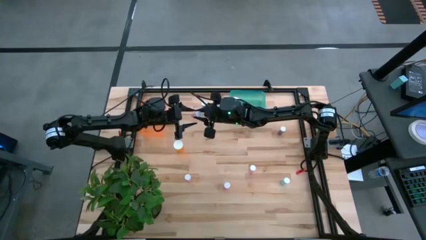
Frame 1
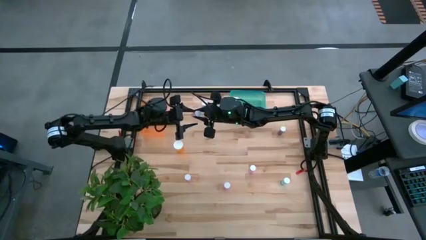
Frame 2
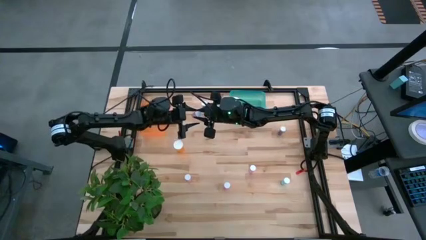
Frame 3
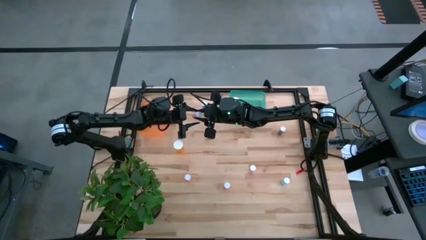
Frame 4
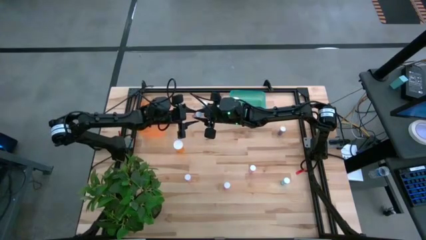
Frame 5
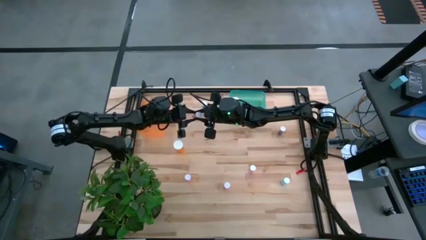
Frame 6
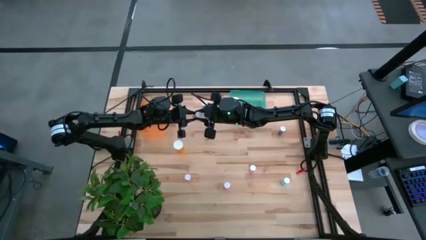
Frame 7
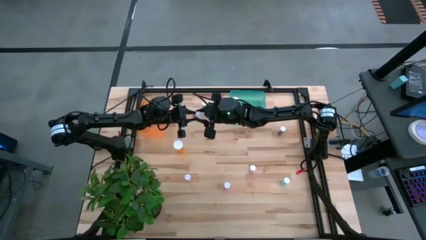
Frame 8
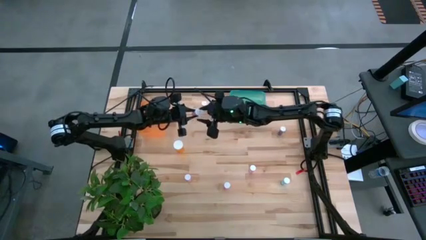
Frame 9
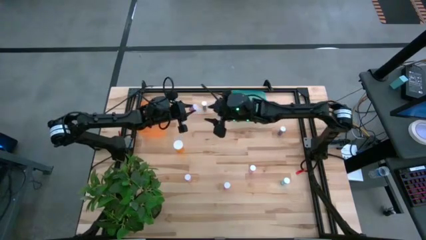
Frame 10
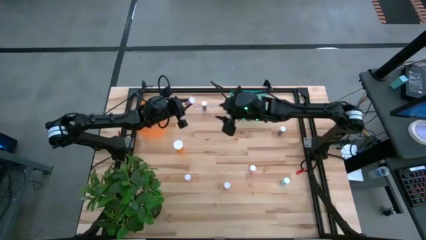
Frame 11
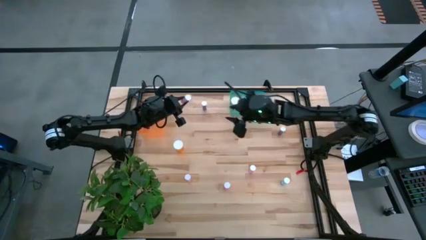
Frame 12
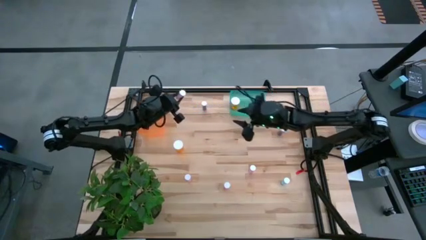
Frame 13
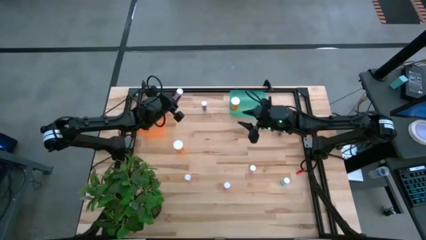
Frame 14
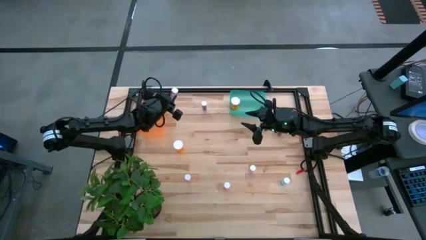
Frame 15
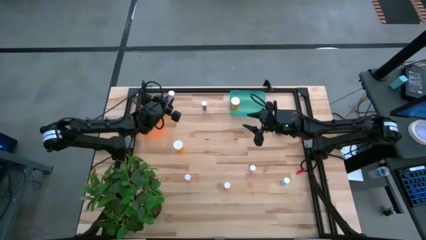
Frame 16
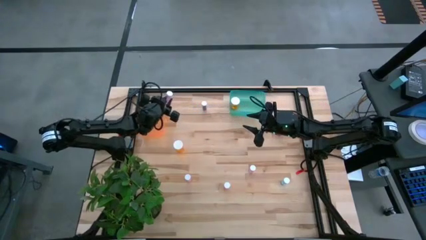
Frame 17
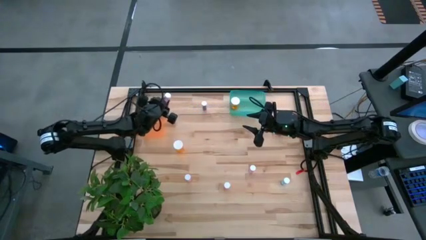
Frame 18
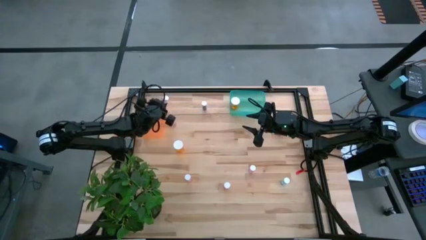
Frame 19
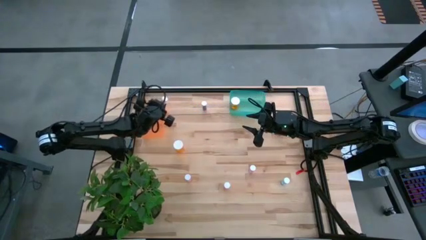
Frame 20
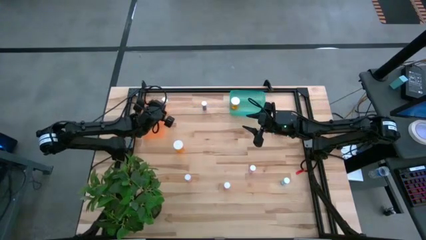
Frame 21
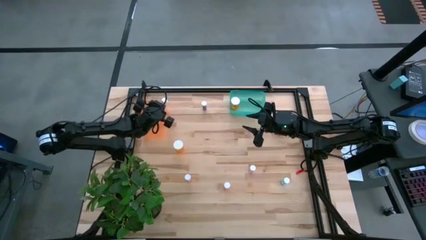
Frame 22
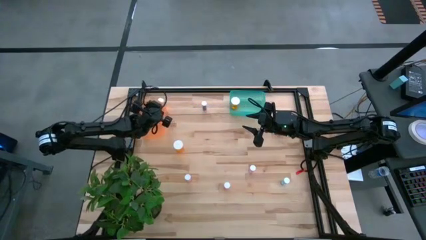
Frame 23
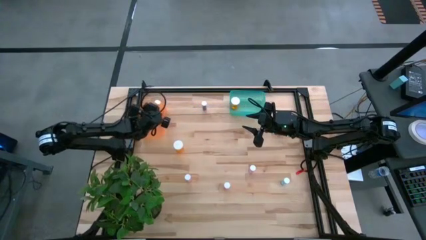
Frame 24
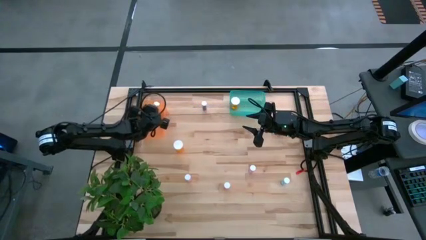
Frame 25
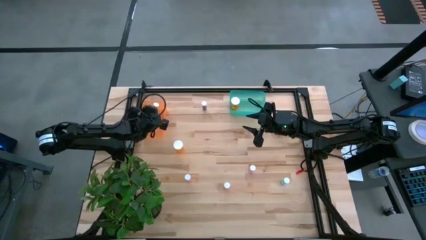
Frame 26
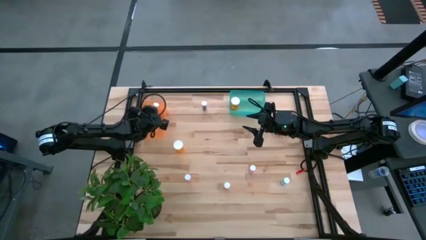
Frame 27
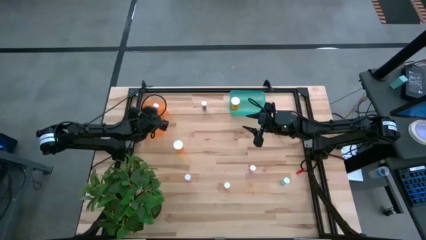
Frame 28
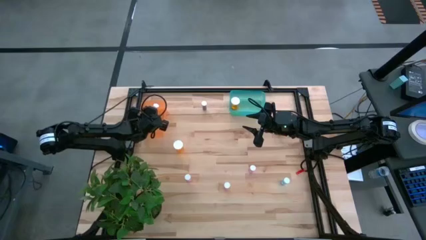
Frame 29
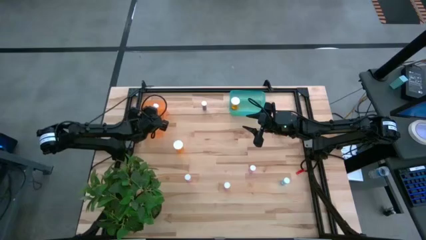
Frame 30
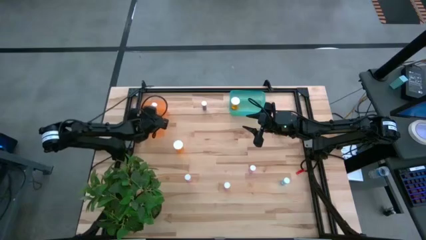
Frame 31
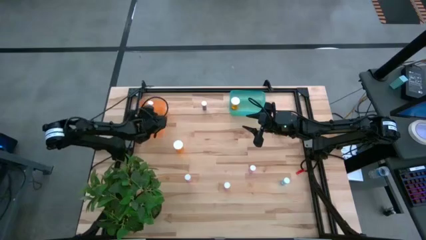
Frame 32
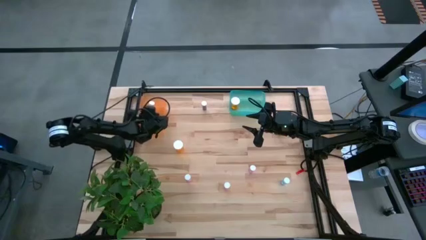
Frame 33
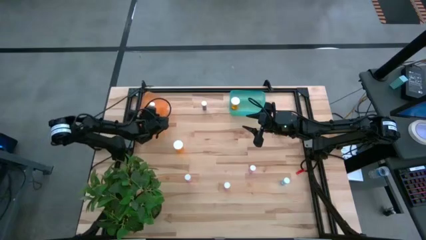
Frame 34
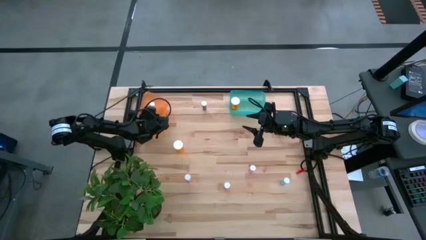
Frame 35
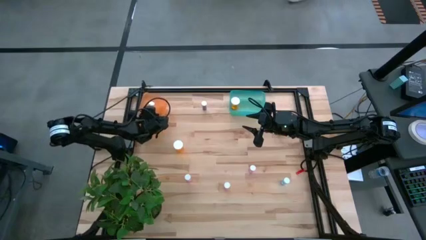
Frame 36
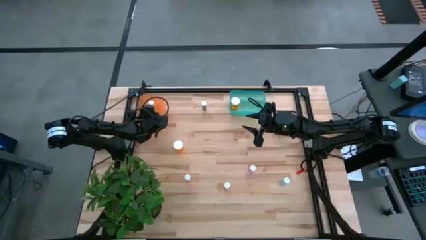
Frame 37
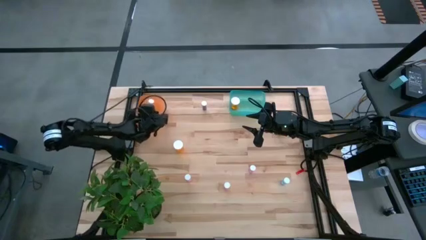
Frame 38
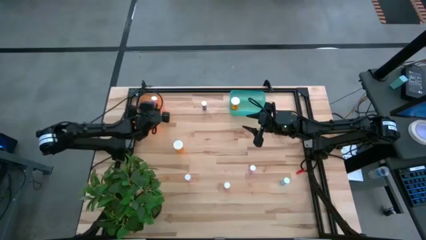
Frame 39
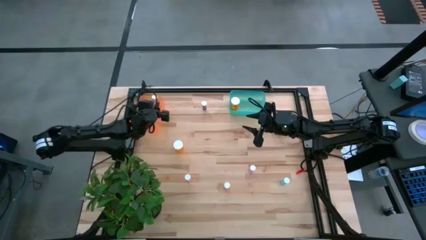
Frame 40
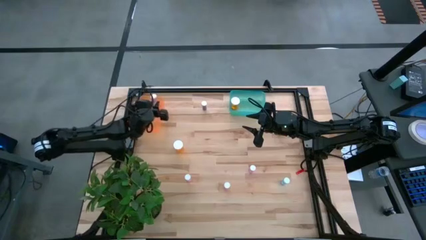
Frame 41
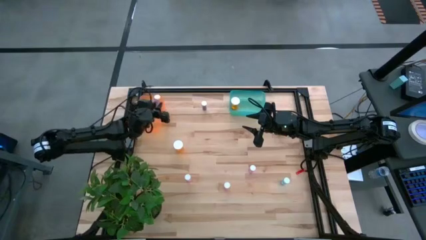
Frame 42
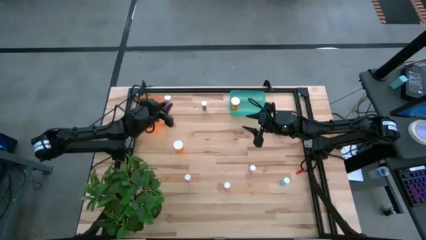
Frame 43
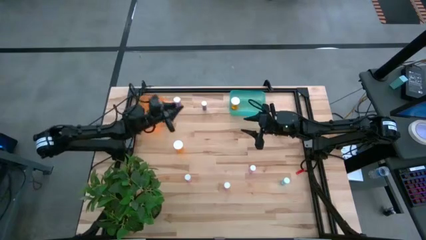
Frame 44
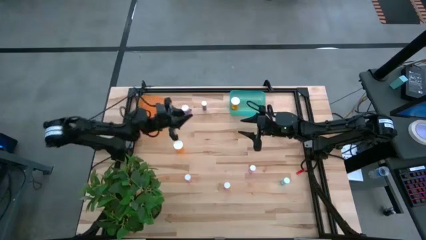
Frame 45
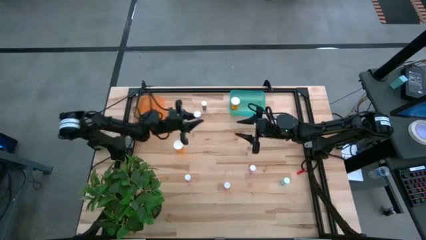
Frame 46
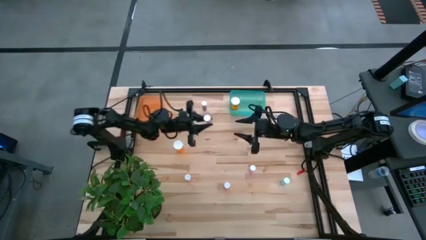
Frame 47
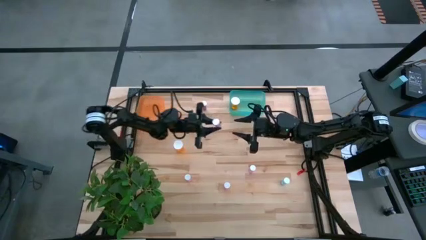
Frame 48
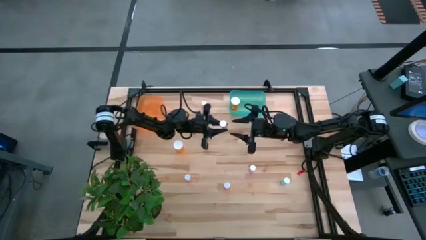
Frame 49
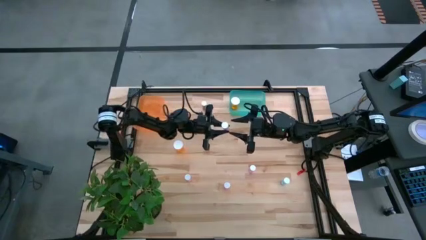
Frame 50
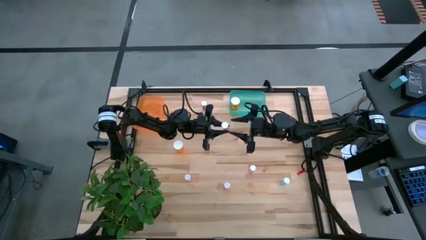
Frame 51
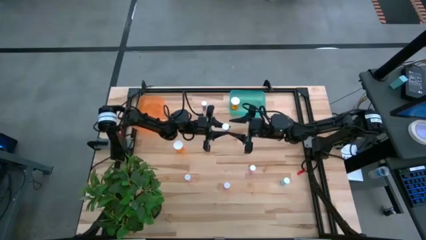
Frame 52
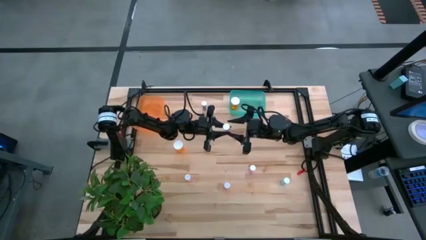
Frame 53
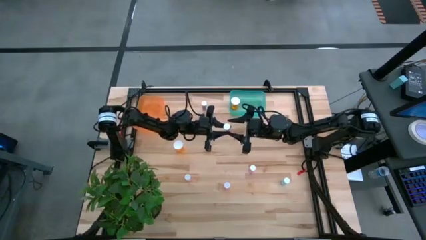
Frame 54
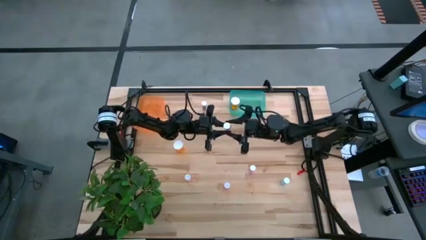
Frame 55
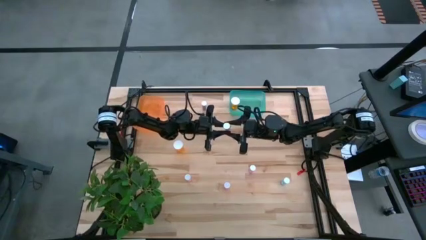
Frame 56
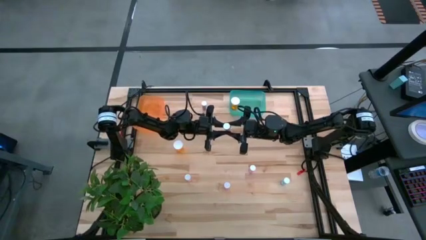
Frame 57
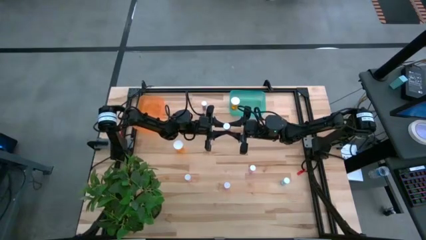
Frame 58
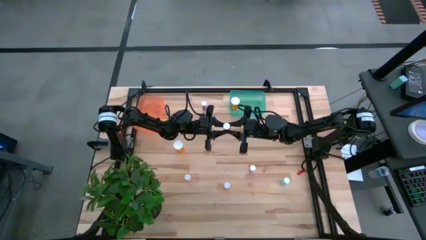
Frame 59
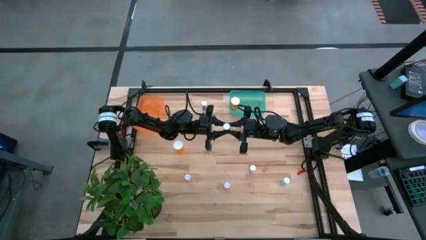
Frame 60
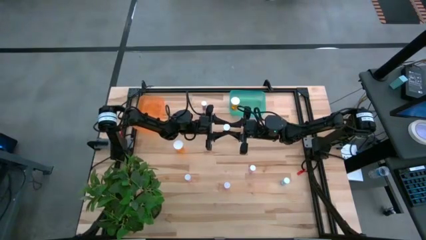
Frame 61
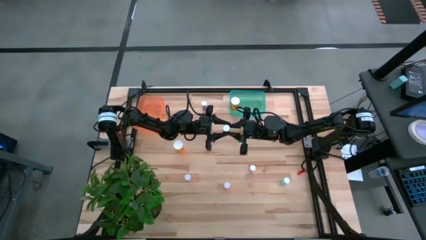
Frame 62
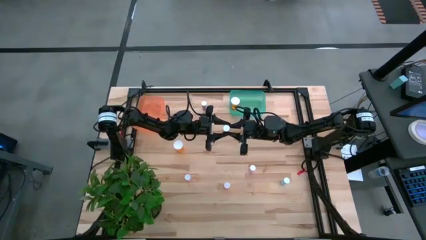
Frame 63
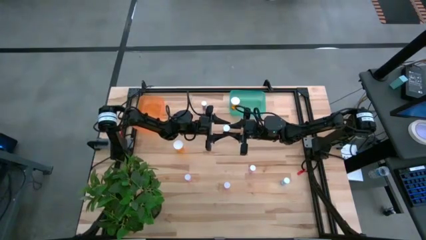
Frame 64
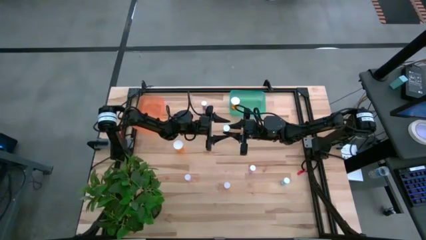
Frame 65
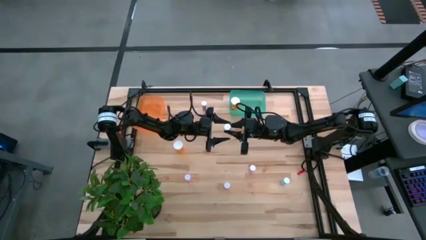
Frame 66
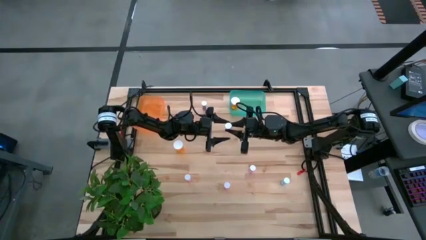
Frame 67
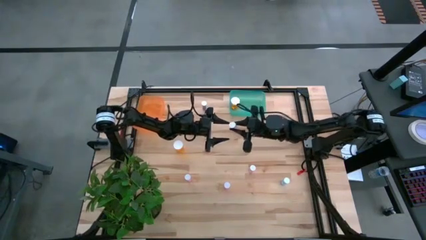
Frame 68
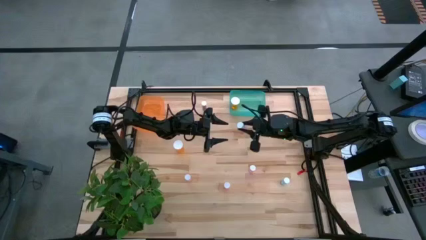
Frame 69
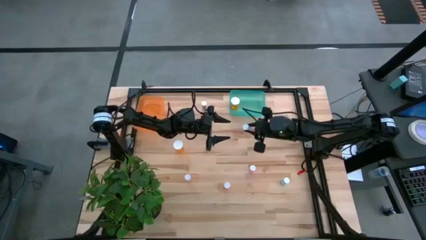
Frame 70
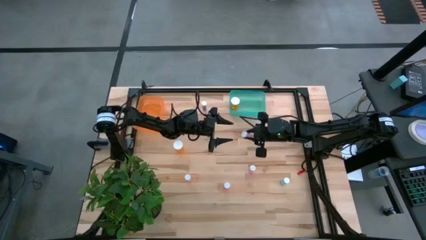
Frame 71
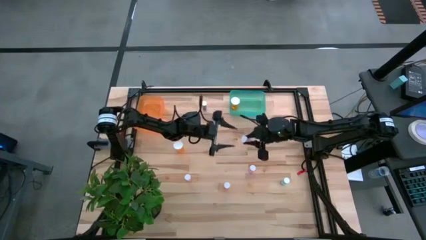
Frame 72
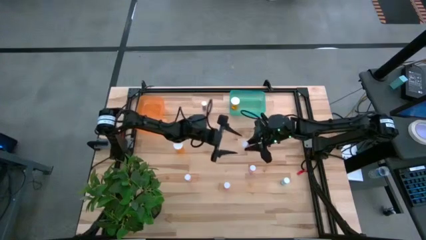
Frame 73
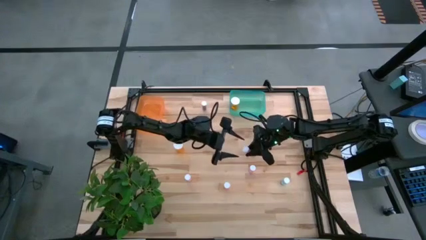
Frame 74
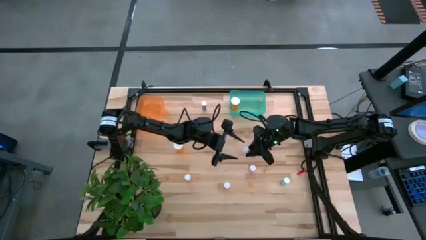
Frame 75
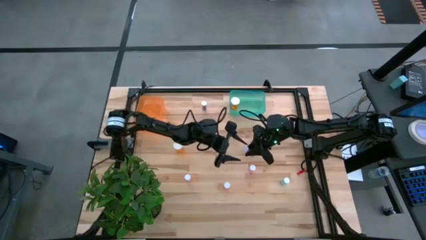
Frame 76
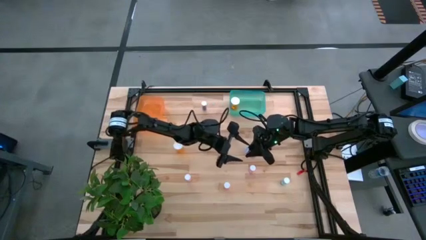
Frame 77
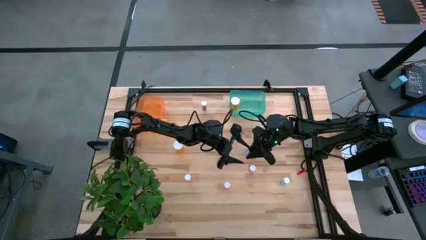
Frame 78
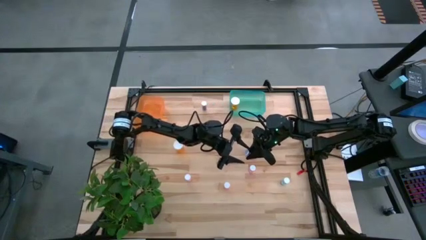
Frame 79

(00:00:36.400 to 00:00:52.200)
Task: Pick and place medicine bottles into bin by pill shape (circle, oval)
Put the pink tablet bottle into the orange bin
